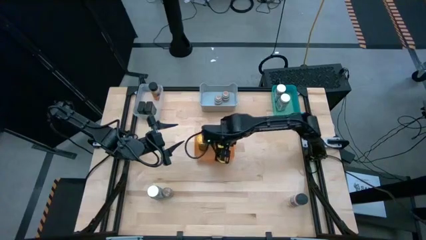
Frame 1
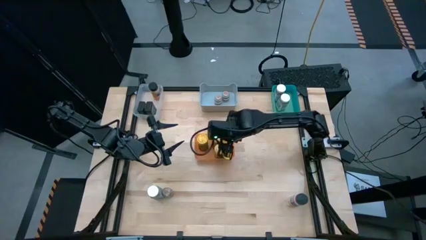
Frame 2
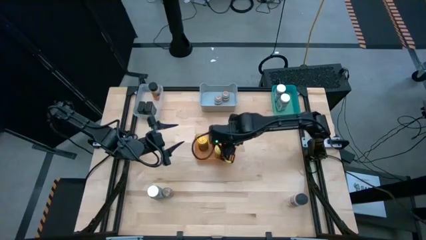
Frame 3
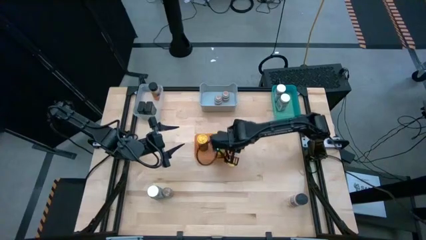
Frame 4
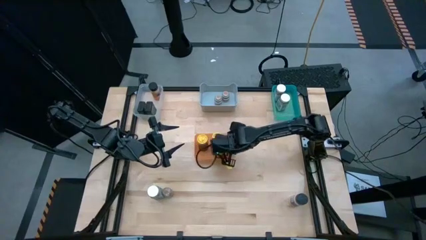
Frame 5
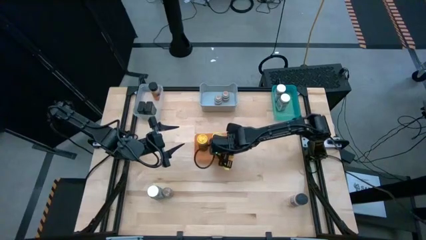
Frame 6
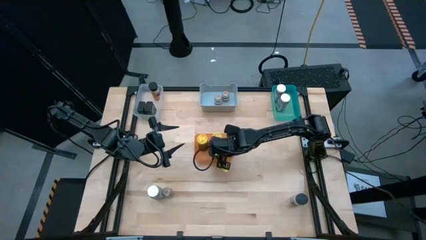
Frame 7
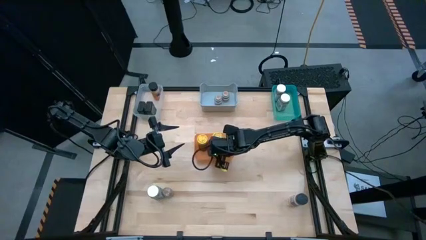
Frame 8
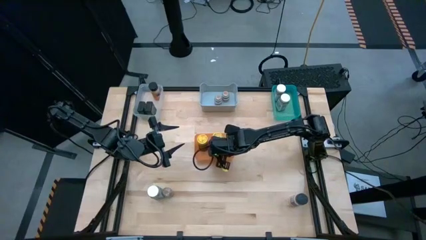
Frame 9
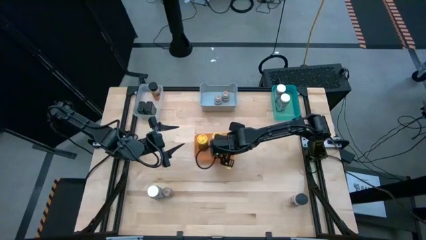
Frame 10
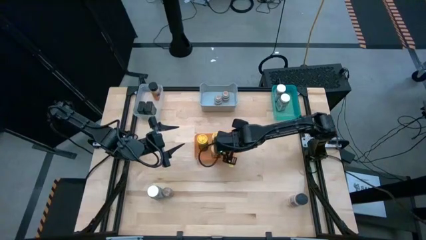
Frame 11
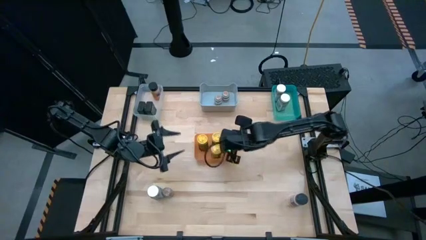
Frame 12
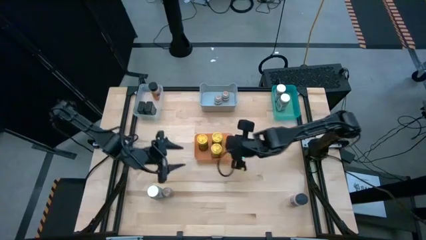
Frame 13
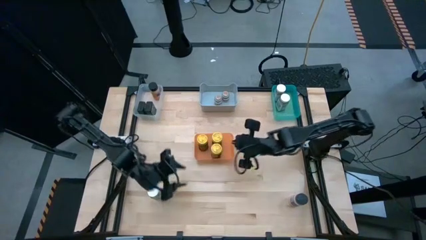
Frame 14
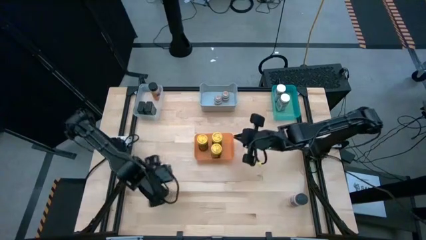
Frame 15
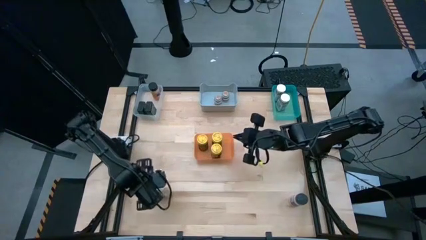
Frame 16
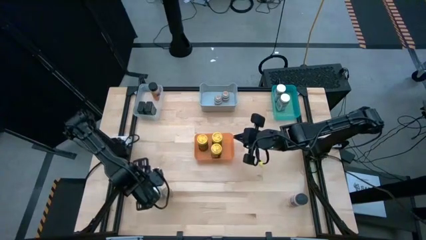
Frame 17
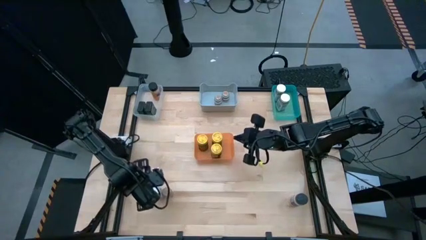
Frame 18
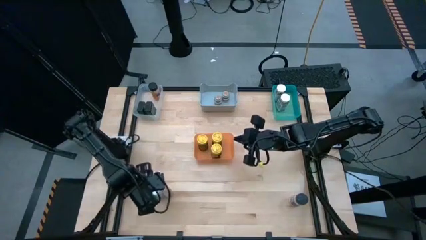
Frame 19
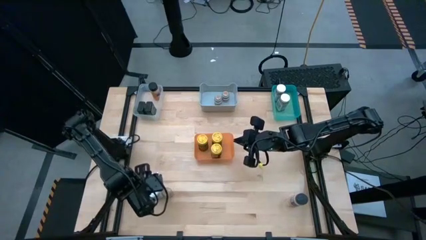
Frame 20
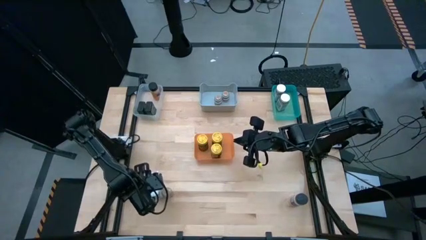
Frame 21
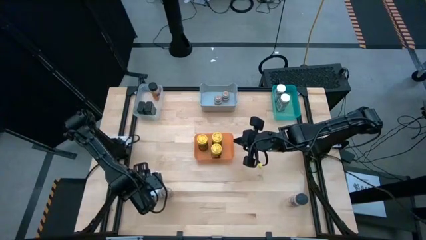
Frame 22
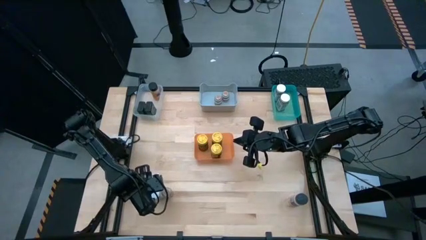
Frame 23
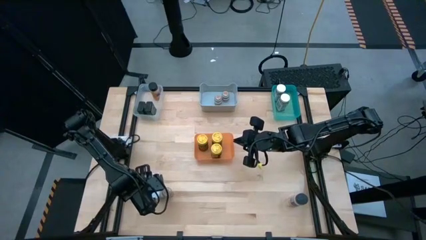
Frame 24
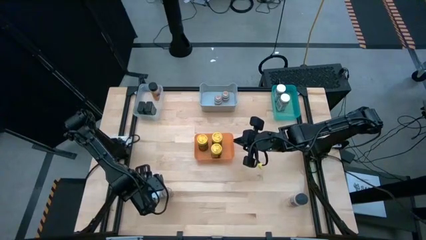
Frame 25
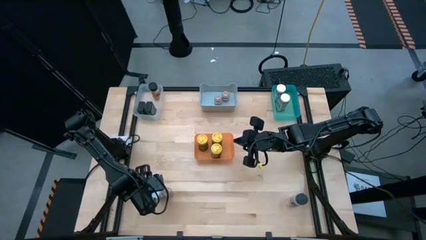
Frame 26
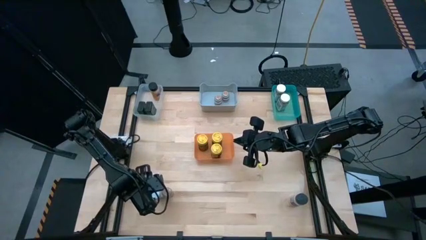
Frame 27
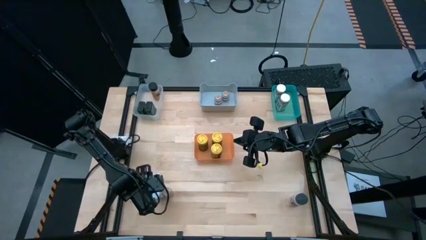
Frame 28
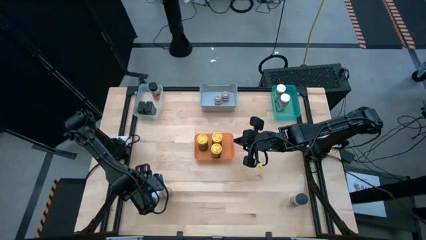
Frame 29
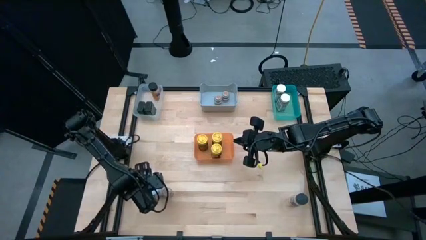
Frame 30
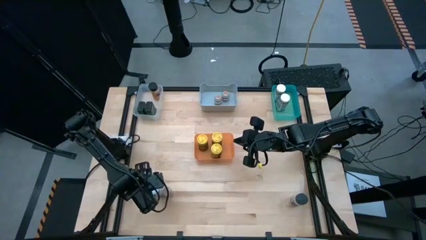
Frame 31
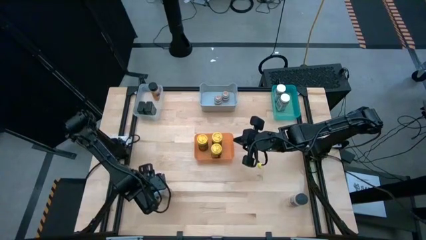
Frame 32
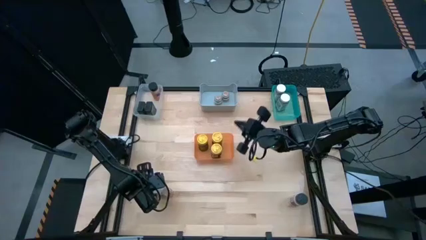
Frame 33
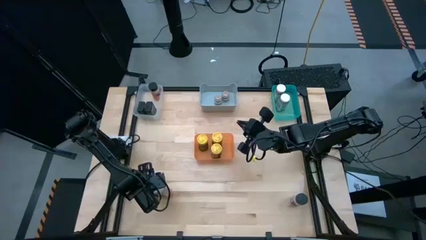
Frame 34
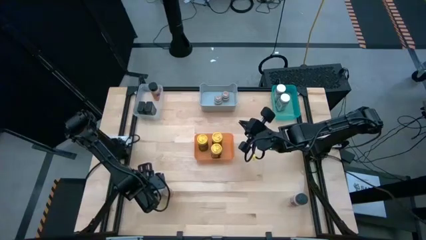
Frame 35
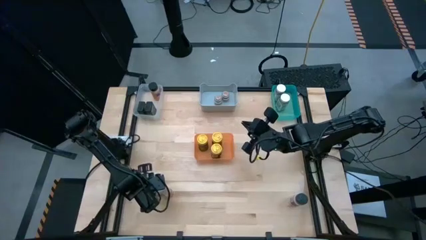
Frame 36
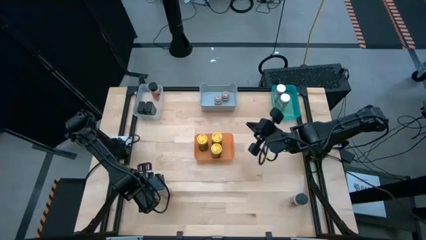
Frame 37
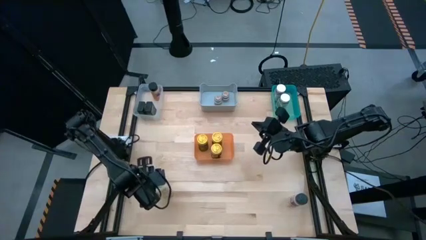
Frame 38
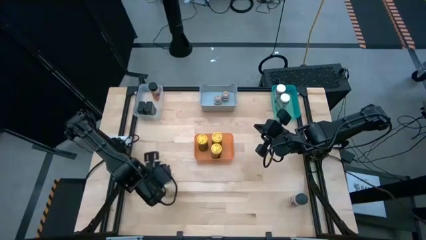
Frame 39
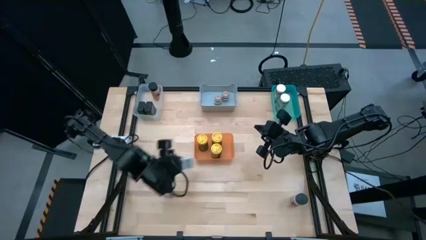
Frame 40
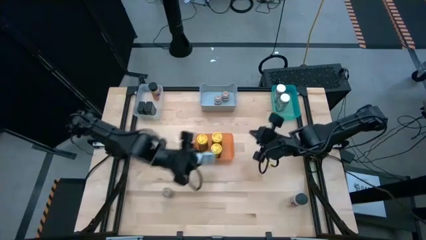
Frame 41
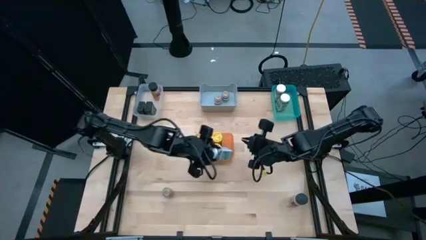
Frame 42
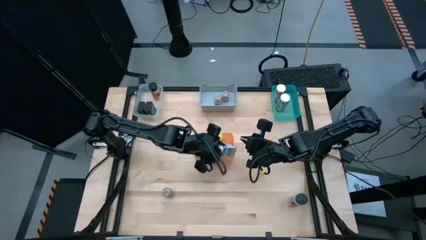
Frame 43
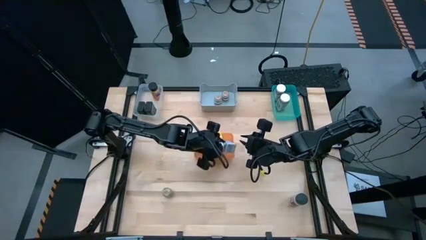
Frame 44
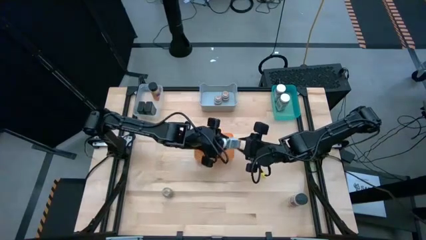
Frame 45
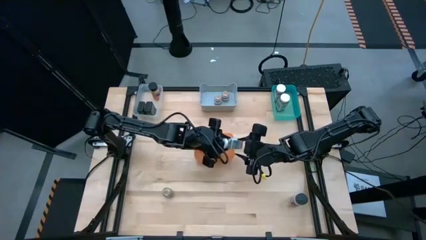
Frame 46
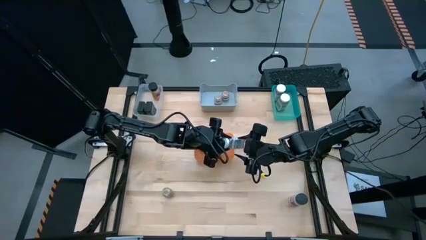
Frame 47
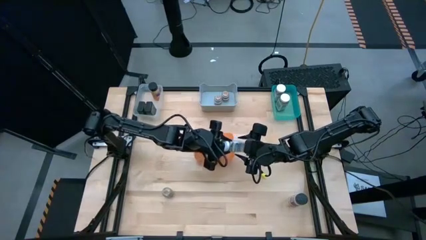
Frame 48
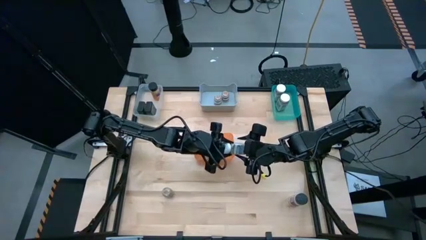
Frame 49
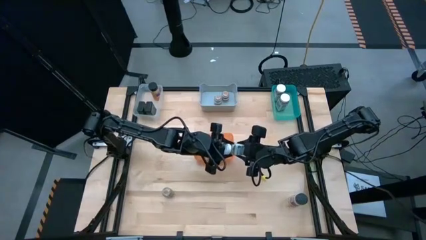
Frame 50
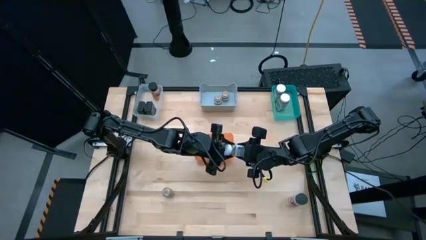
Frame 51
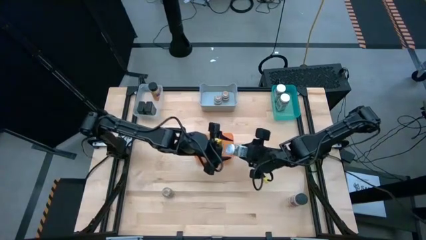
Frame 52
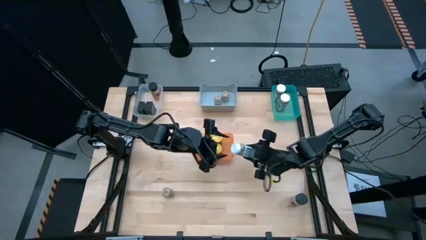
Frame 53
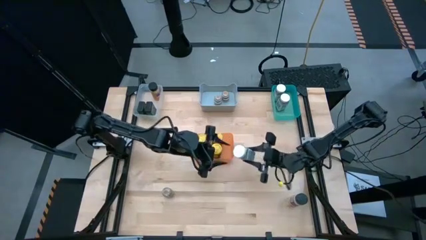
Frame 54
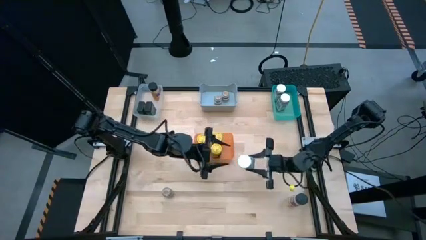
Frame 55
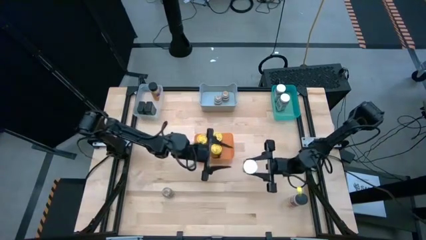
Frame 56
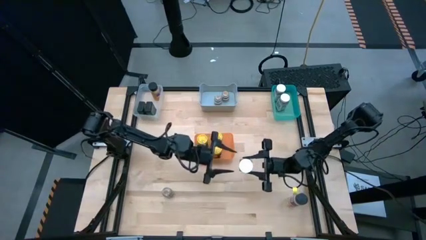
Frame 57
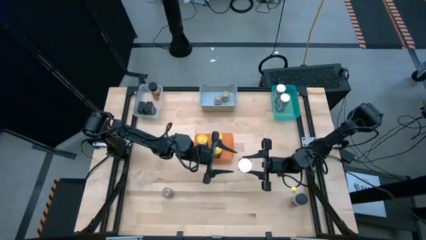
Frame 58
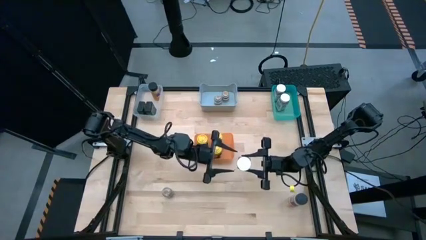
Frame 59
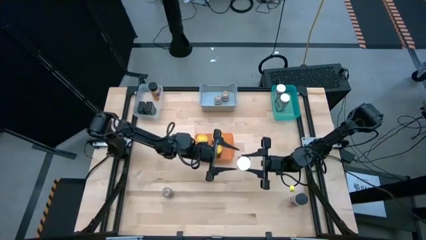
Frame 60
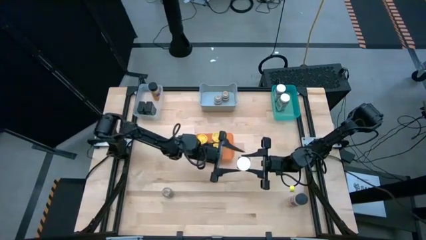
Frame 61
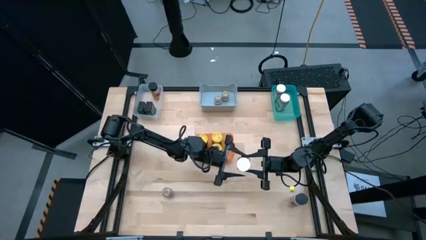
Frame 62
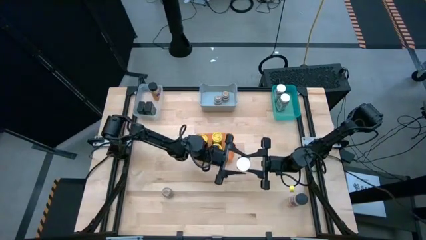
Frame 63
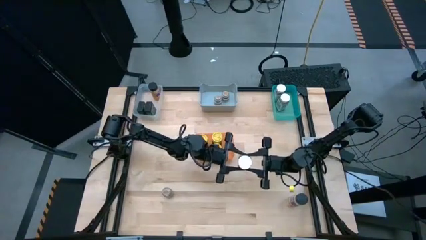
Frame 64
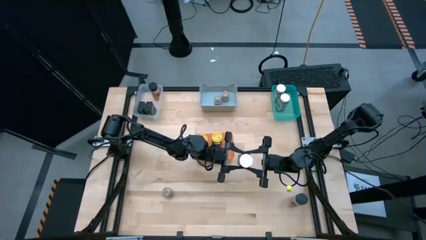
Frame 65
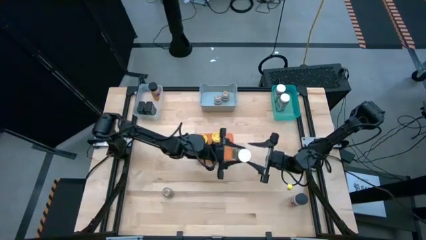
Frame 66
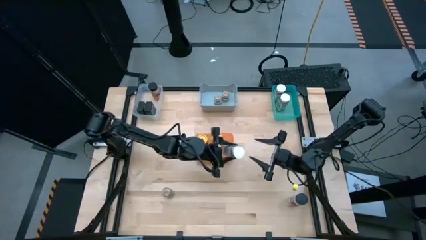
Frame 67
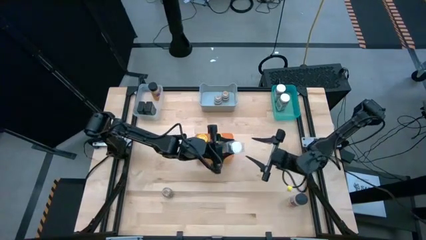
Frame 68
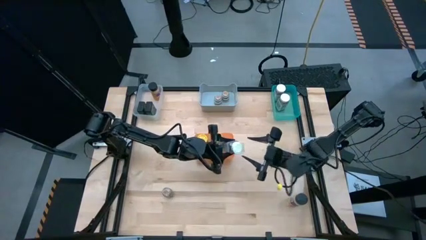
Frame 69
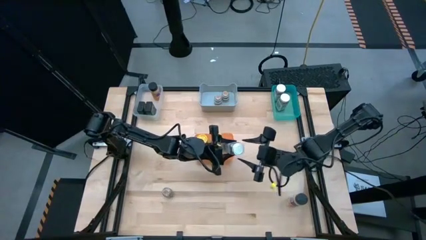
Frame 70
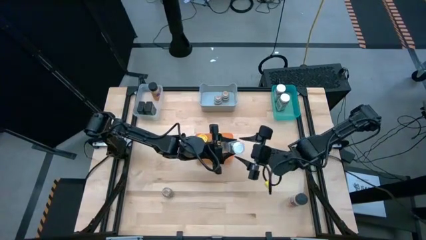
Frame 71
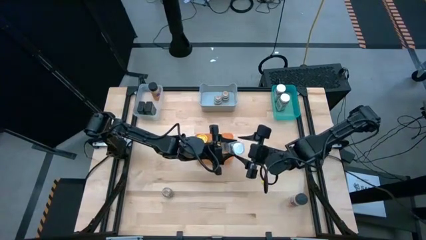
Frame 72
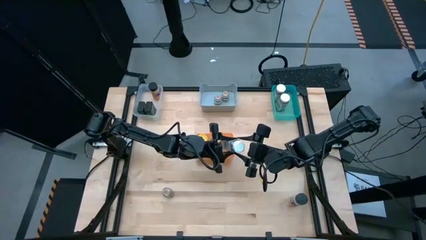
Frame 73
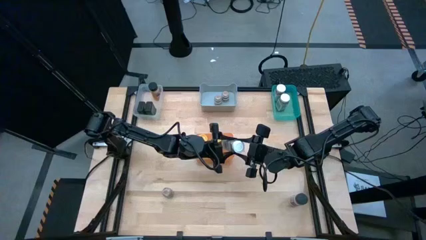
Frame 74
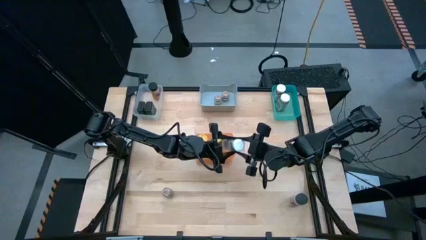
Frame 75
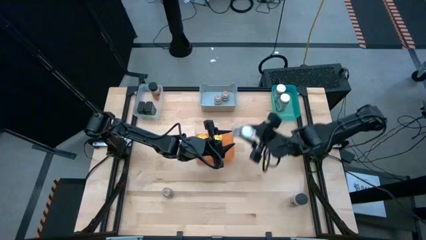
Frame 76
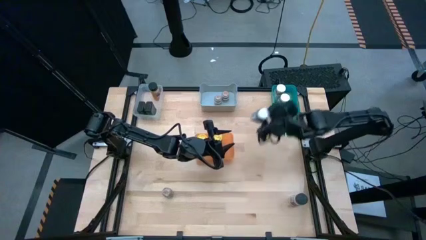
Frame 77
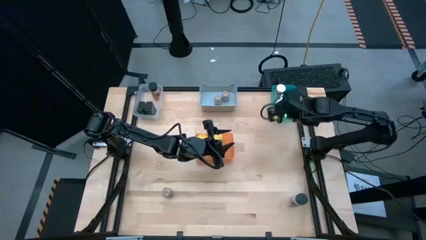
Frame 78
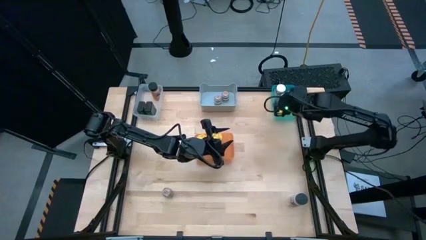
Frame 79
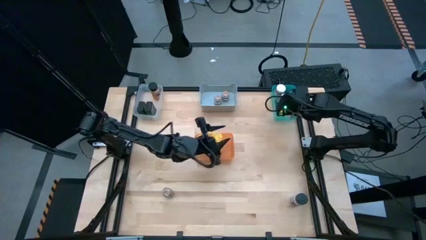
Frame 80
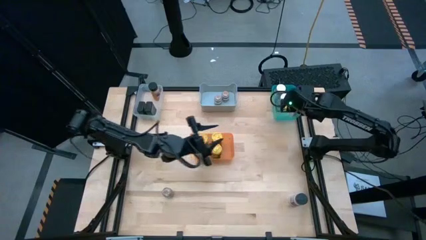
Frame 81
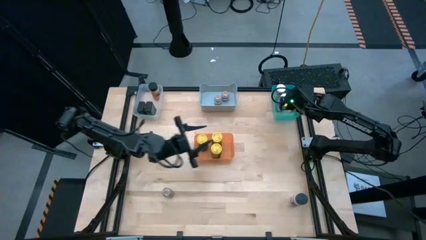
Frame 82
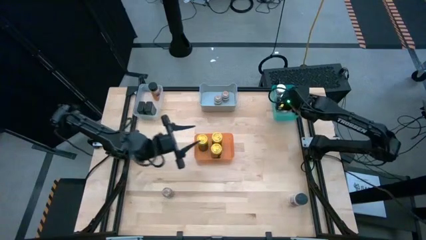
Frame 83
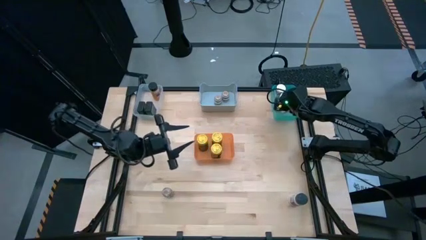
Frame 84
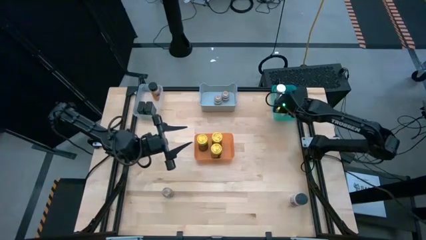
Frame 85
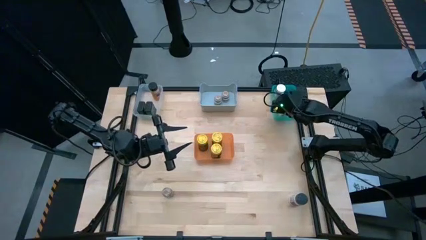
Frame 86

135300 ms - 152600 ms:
Task: Sort spices by type
Put the white seasoning bottle into the green bin

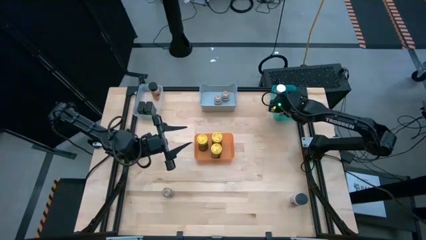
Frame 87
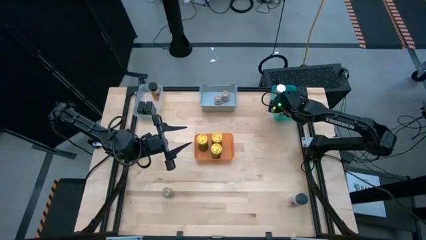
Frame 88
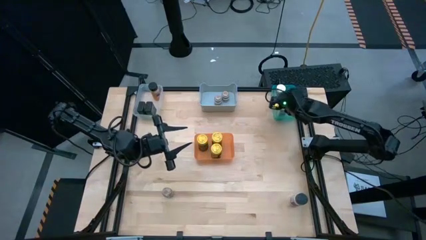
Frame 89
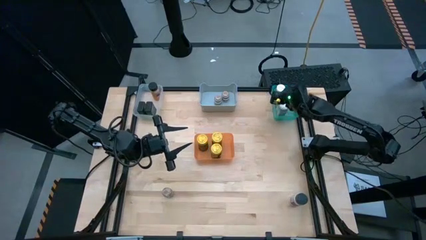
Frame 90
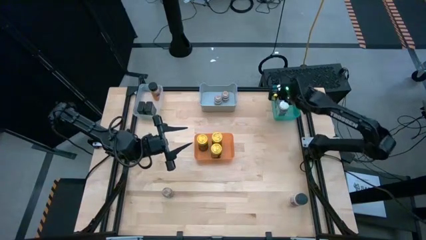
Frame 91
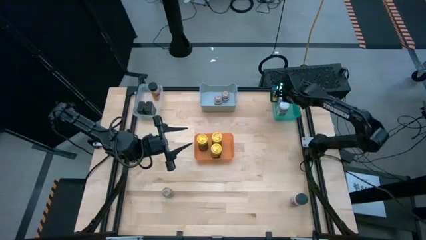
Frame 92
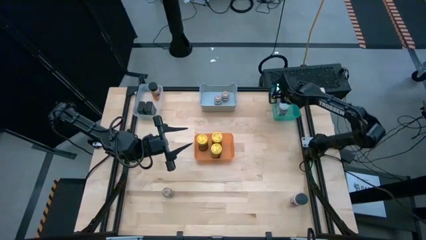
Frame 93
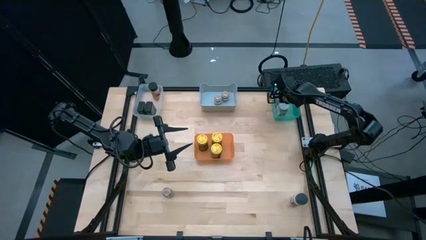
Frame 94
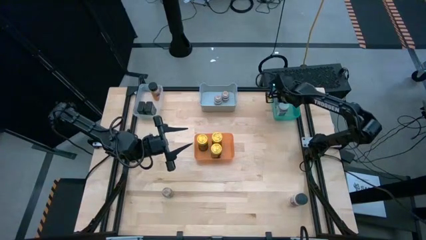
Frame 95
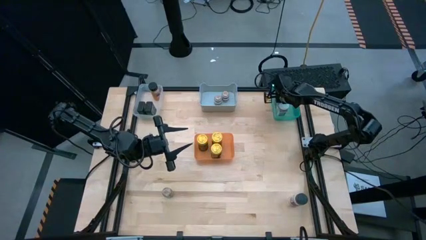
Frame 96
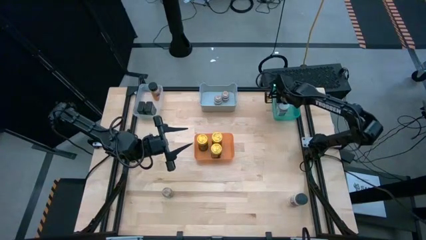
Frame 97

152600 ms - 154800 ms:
Adjust the white seasoning bottle
